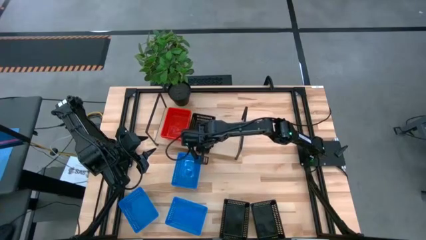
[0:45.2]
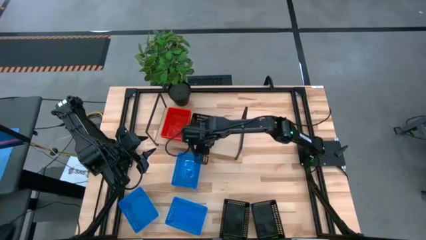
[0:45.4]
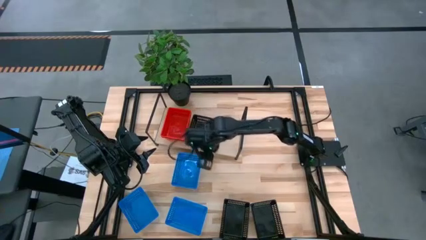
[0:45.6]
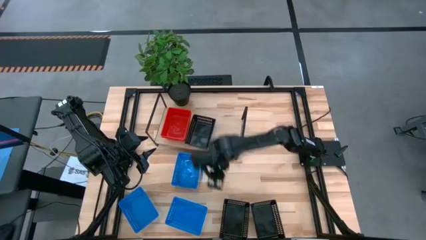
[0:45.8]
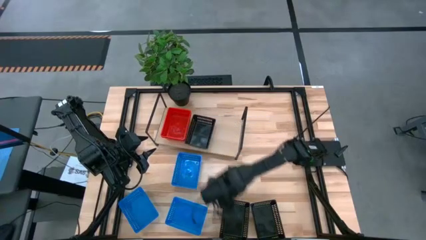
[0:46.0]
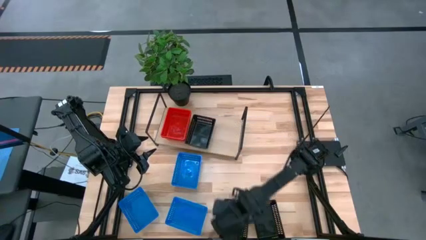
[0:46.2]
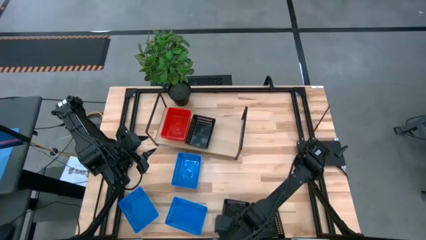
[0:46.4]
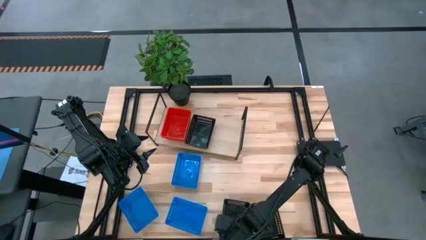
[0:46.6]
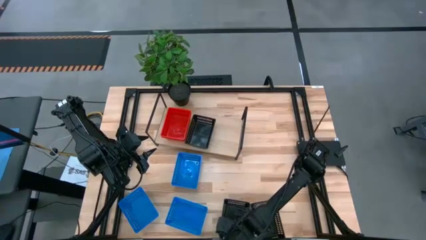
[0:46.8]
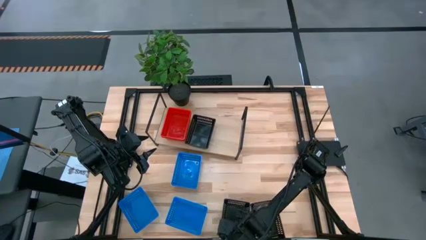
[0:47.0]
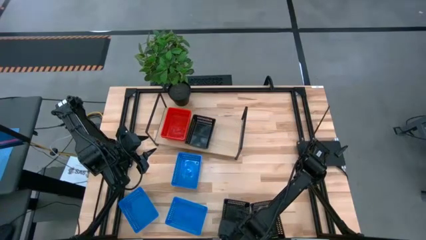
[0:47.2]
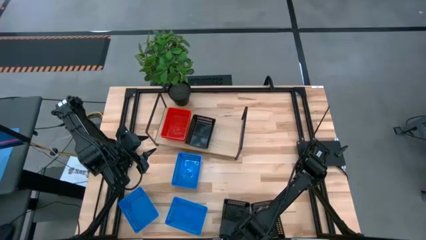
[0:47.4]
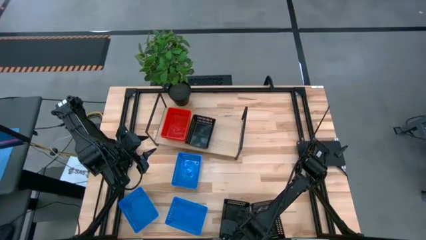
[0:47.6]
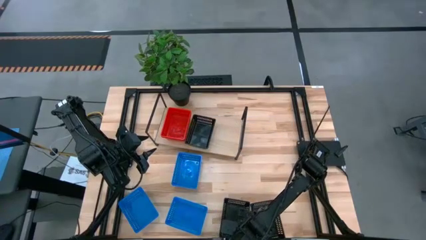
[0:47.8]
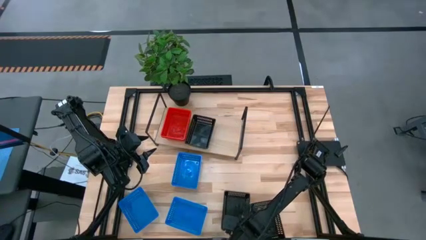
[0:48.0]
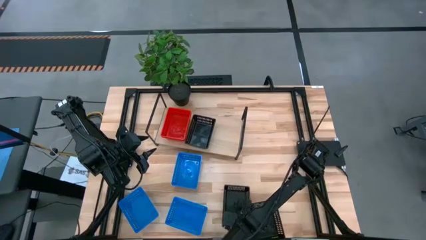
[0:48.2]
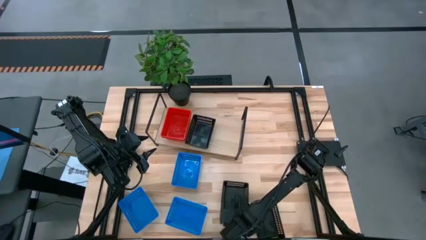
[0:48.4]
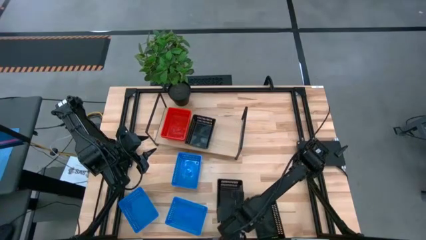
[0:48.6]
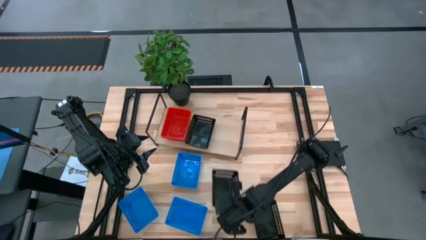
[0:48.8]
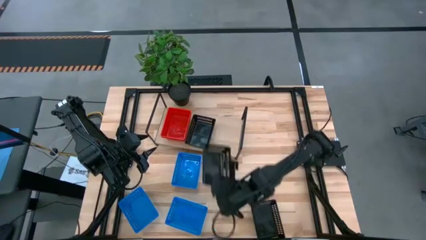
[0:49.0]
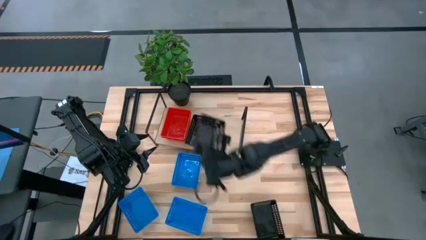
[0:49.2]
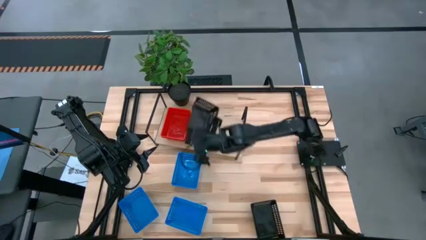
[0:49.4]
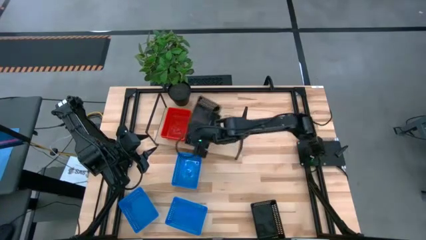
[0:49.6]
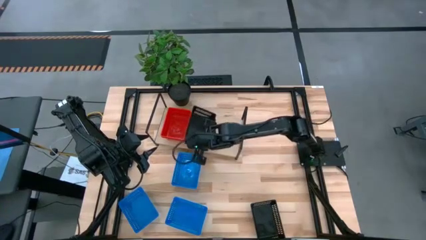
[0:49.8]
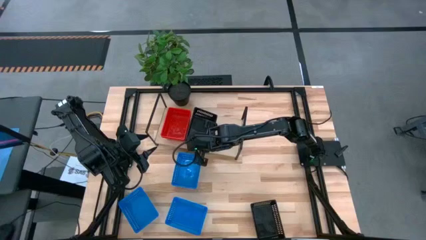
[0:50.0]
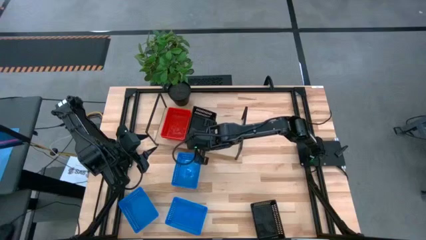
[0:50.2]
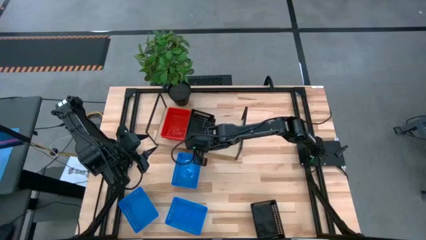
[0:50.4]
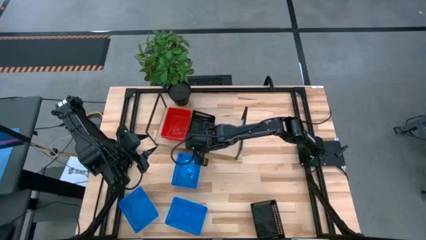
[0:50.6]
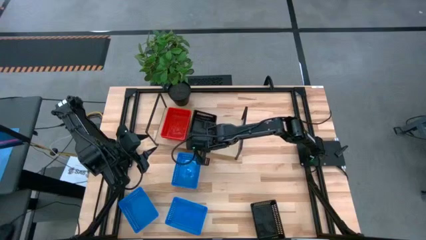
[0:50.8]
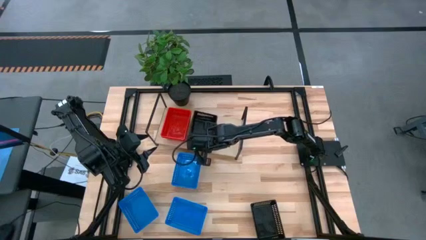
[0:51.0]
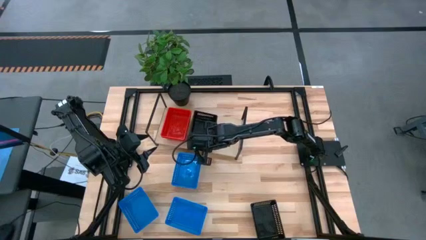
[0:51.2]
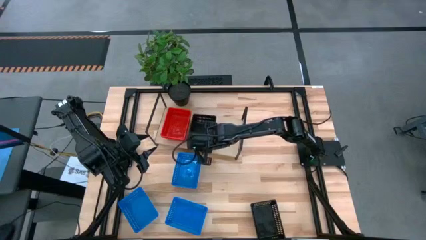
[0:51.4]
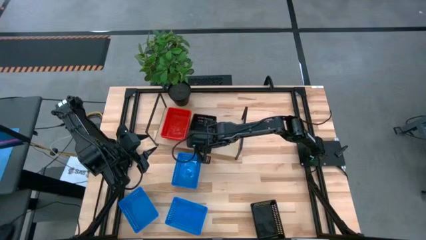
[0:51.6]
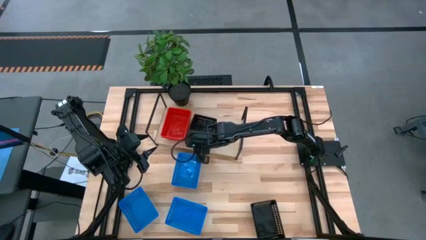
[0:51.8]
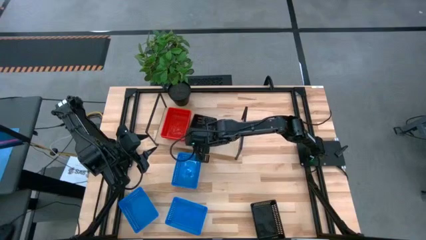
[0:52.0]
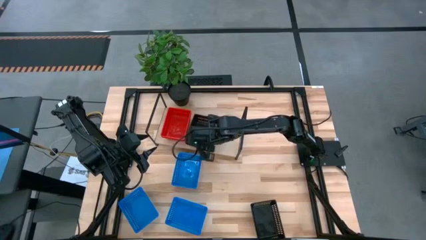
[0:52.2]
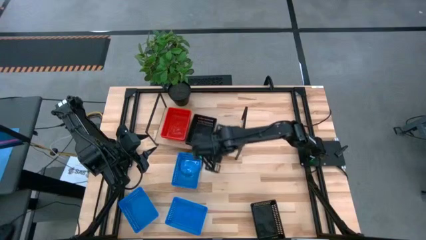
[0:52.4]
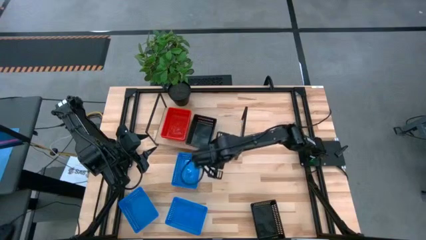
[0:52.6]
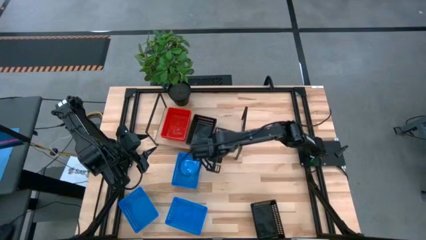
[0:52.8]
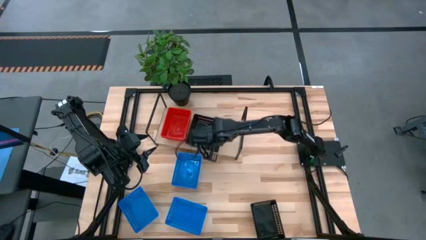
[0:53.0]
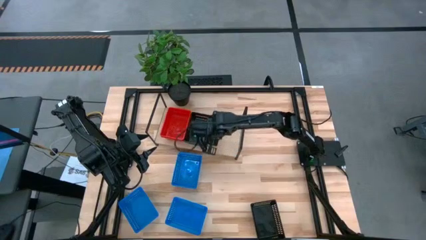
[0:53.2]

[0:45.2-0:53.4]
Task: Stack baskets on shelf by color
Stack the left black basket on top of the other black basket on the shelf

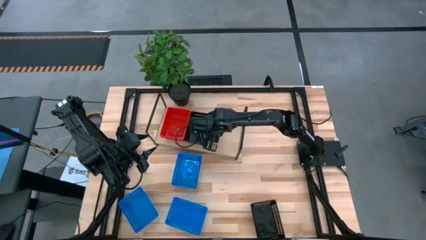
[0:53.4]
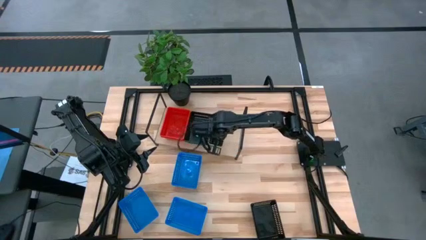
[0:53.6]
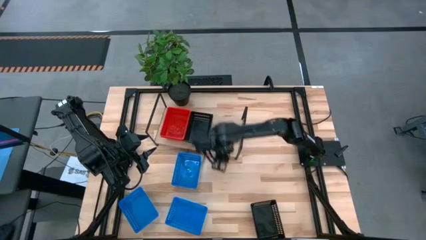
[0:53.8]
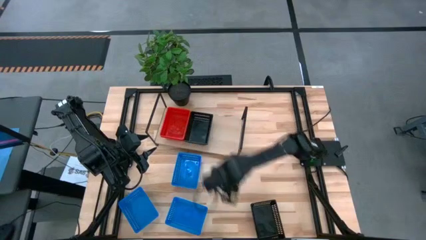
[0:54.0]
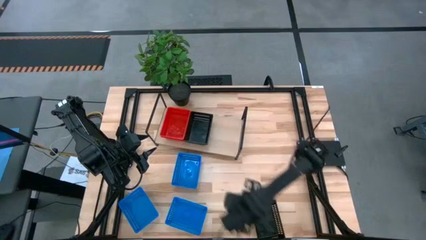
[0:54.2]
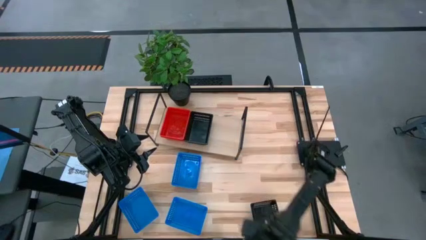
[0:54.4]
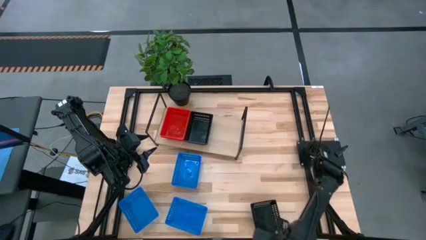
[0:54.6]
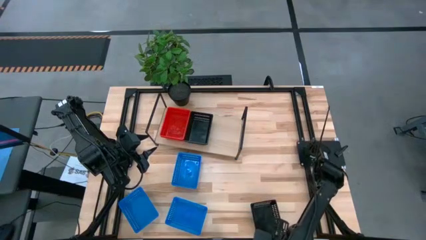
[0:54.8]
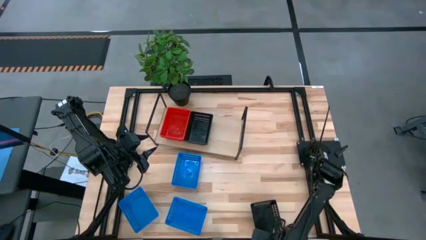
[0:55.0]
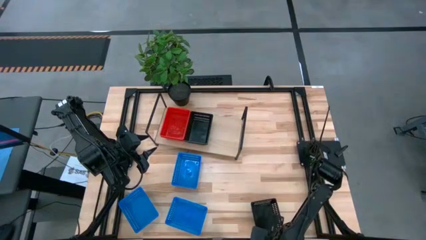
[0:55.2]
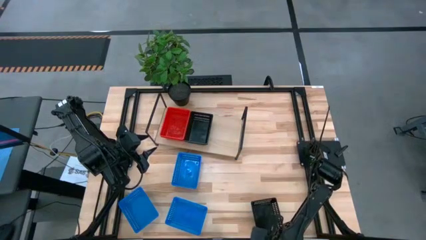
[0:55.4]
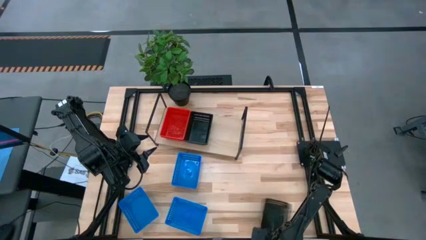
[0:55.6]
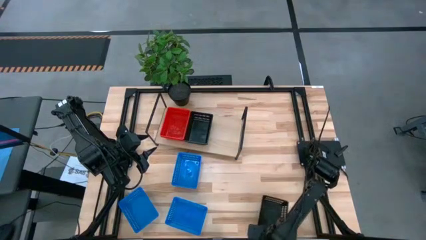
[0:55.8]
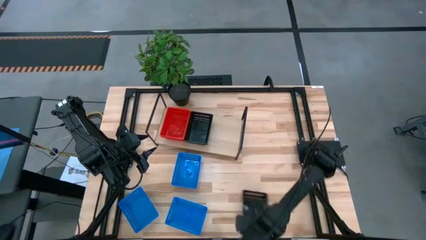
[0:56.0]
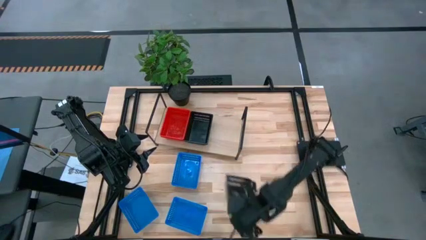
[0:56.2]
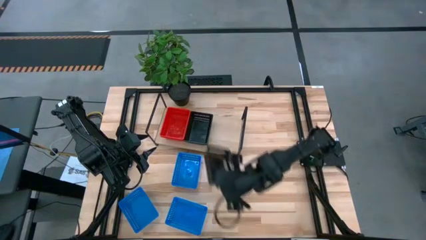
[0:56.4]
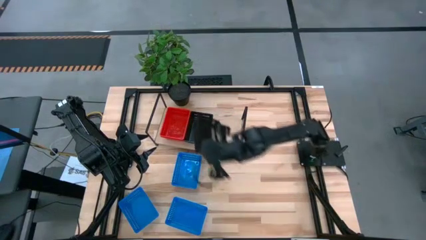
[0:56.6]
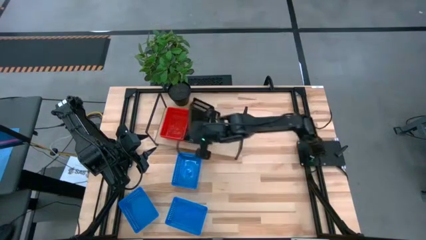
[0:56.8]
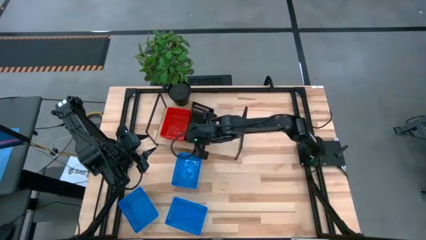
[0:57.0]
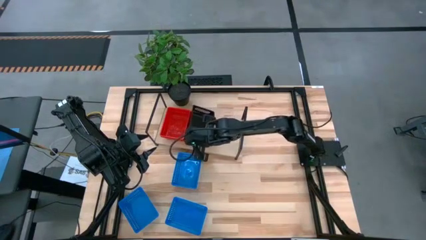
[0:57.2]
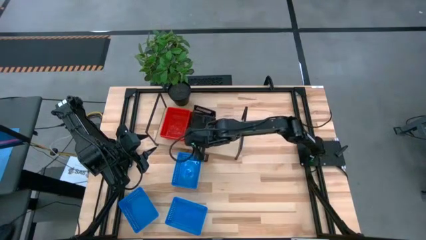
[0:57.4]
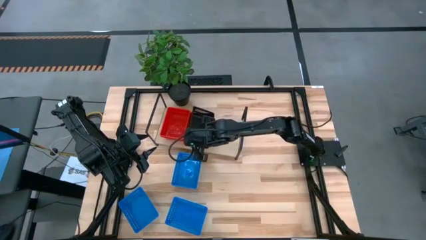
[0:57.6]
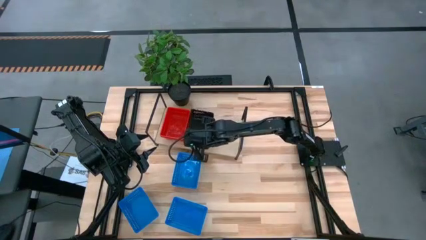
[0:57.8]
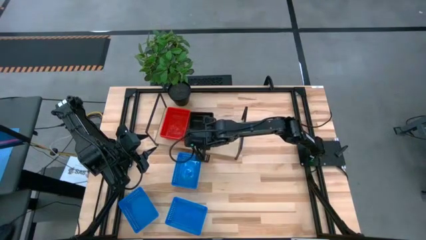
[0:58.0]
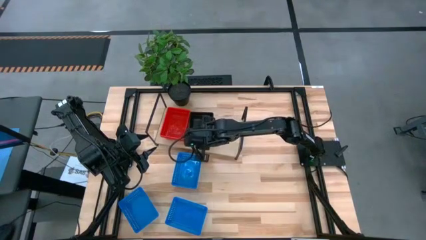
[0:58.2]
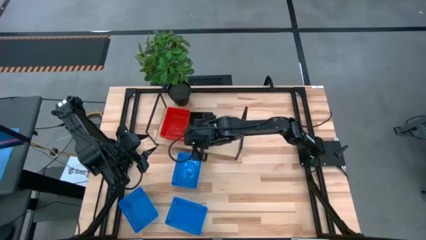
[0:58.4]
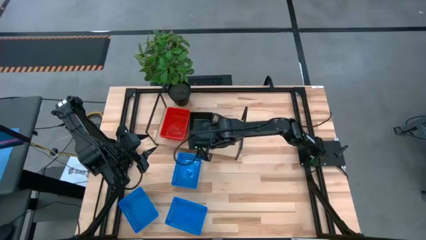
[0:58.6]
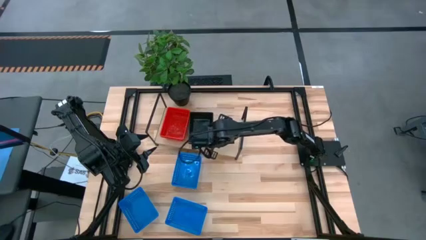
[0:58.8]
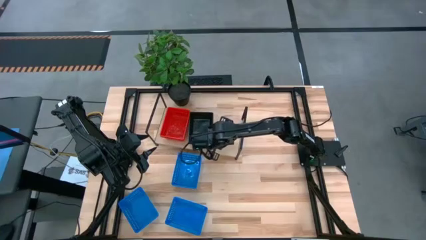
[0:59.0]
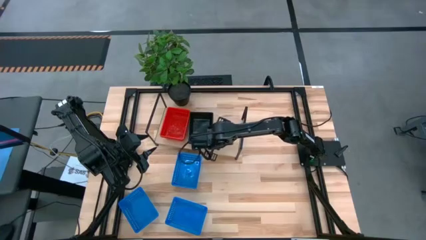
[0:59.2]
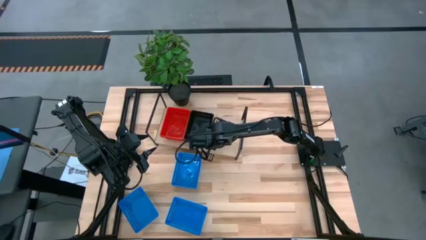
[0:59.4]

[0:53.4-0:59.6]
Stack the black basket on top of the stacked black basket on the shelf

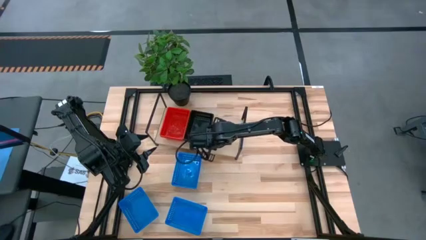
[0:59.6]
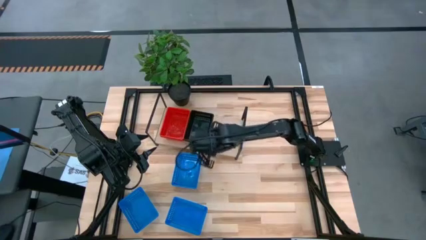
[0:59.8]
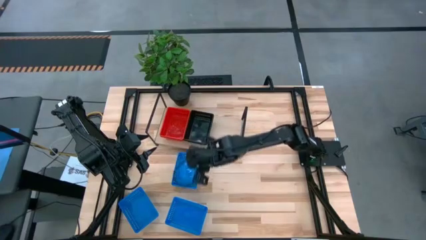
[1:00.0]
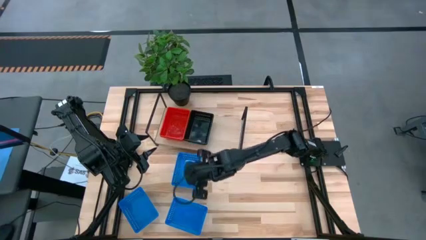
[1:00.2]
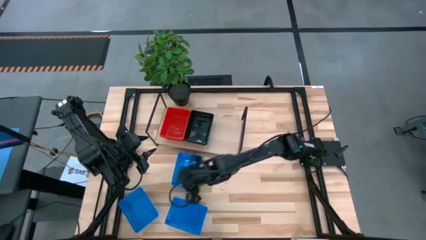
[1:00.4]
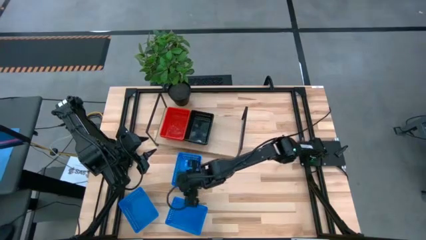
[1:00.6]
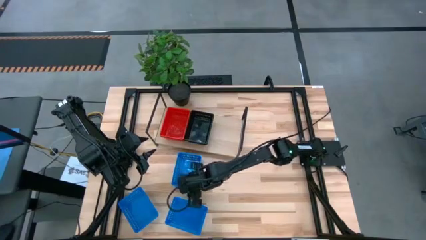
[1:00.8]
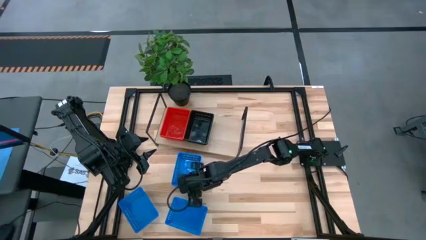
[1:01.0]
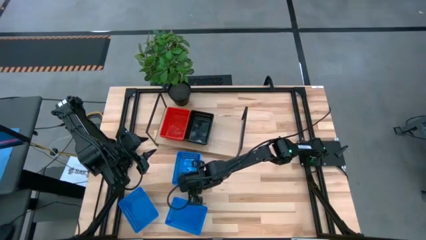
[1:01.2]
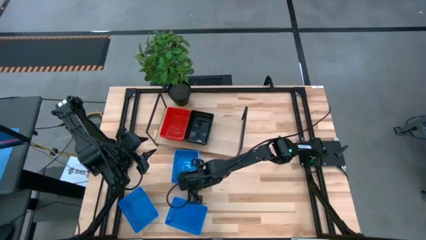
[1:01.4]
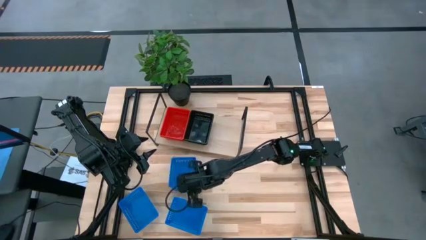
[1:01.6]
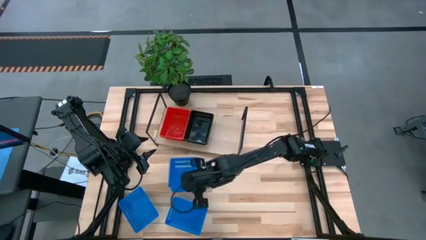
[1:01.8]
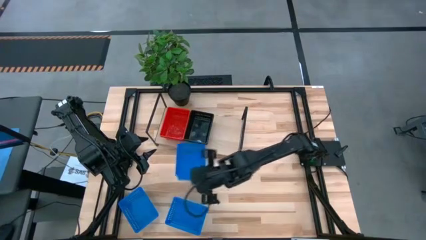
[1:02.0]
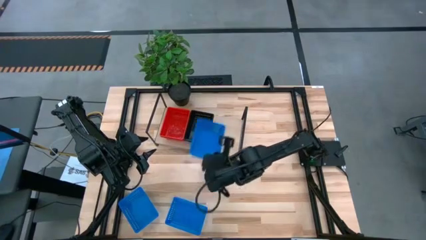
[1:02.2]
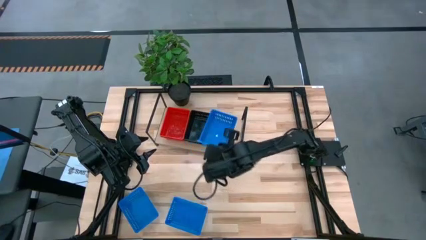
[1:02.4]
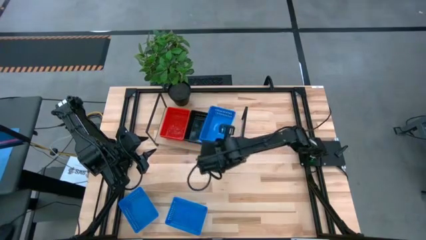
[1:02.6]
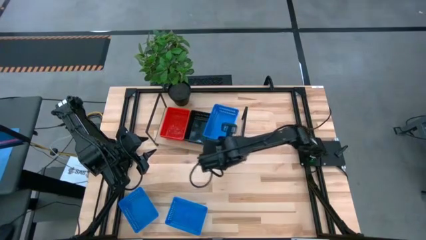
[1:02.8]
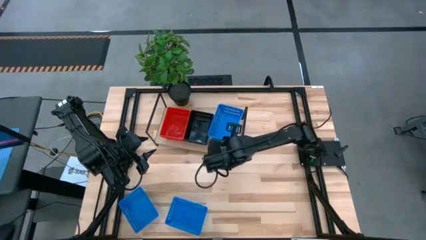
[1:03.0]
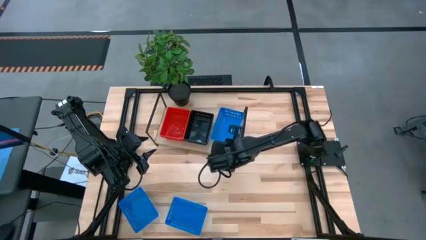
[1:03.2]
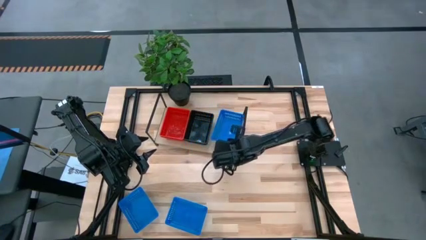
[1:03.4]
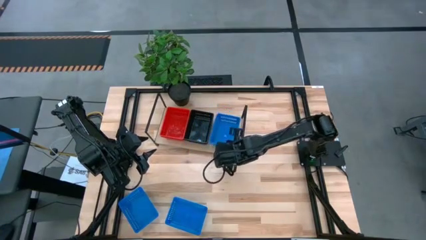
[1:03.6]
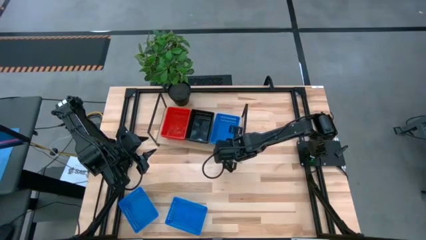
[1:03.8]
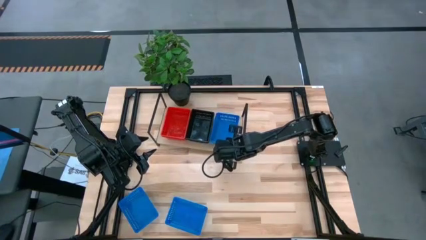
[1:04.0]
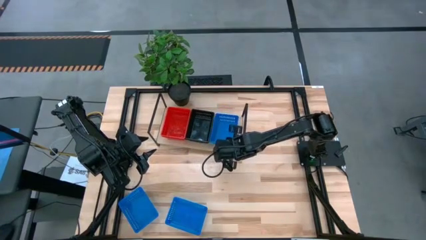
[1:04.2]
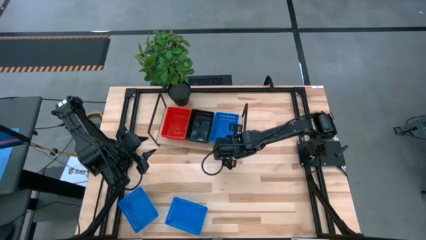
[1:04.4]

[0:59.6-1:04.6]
Put the top blue basket on the shelf
